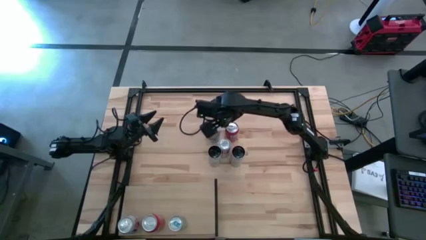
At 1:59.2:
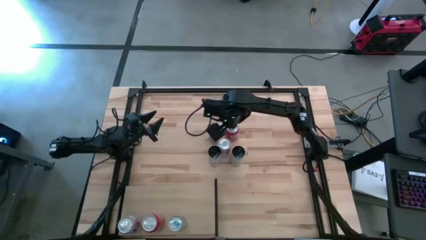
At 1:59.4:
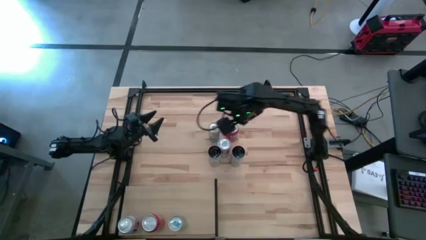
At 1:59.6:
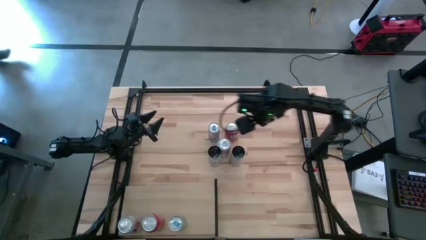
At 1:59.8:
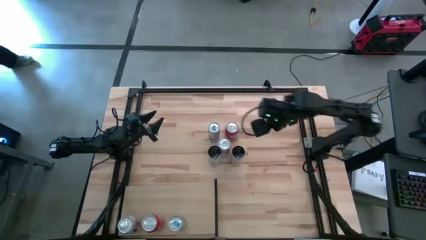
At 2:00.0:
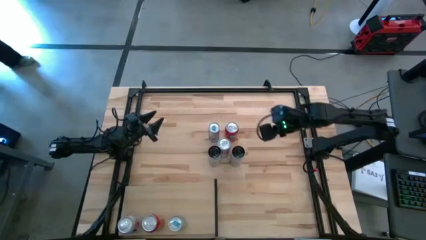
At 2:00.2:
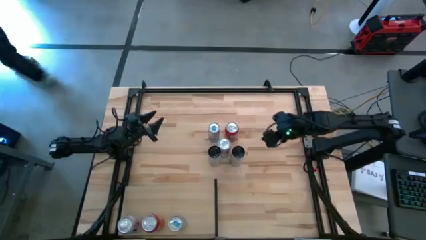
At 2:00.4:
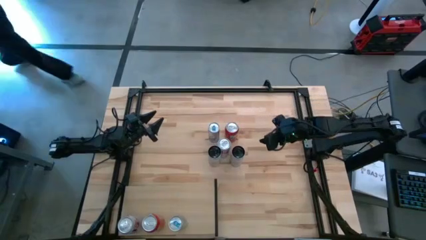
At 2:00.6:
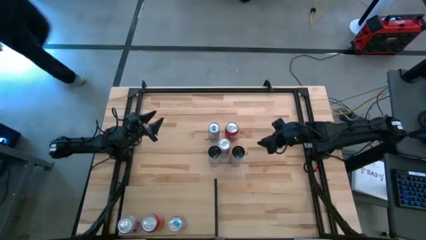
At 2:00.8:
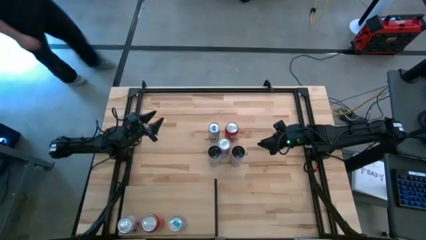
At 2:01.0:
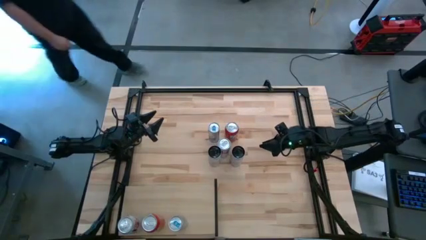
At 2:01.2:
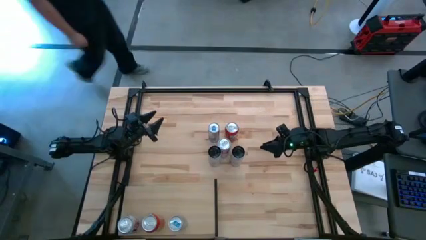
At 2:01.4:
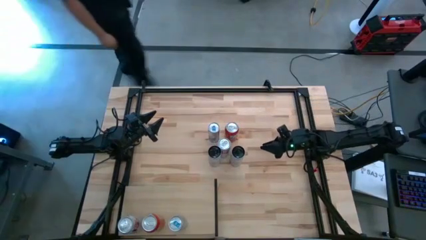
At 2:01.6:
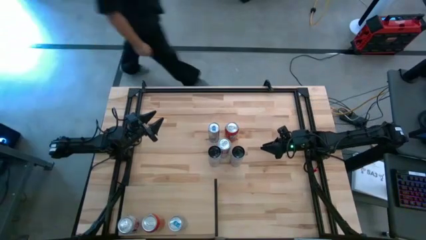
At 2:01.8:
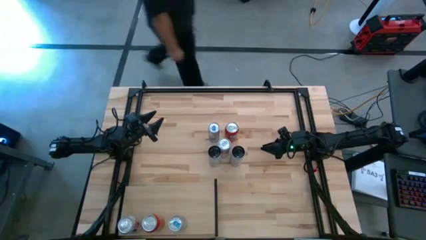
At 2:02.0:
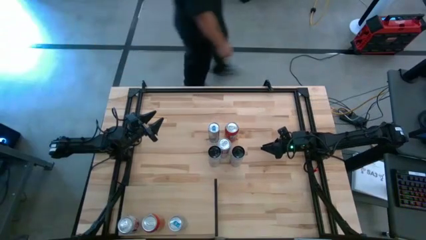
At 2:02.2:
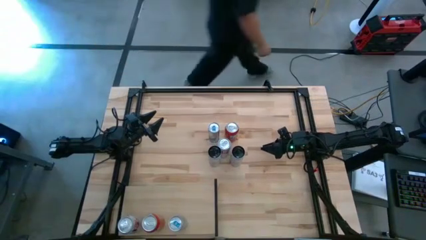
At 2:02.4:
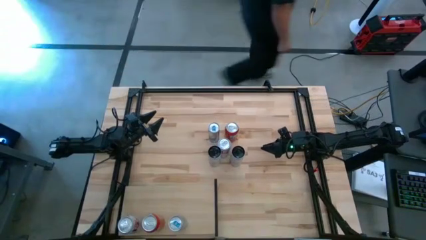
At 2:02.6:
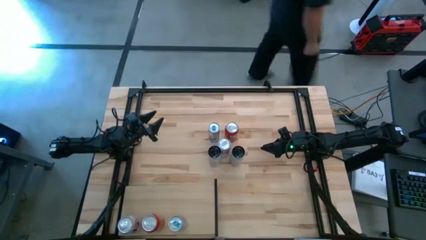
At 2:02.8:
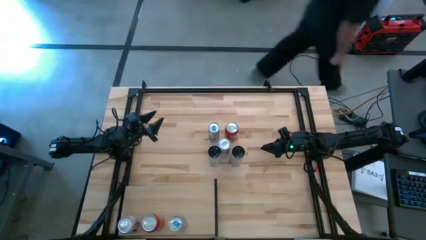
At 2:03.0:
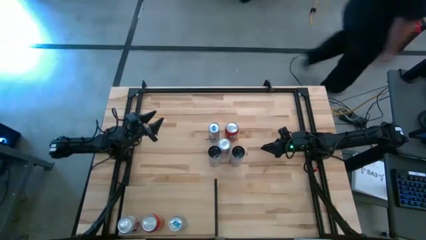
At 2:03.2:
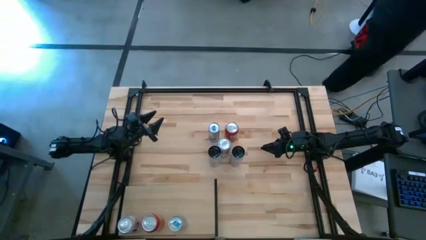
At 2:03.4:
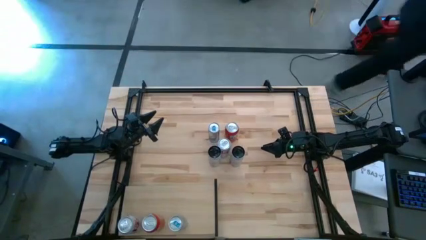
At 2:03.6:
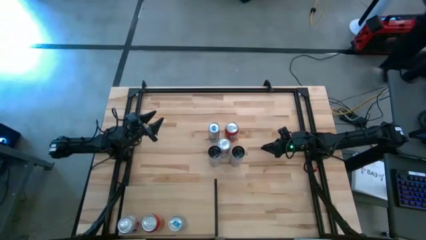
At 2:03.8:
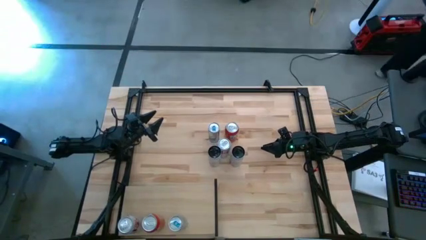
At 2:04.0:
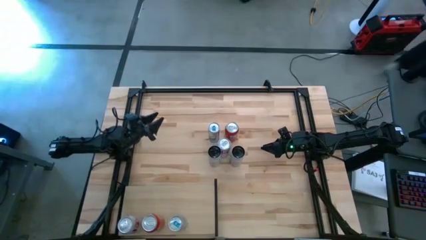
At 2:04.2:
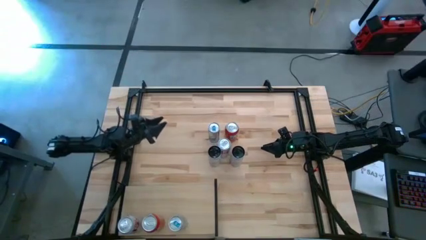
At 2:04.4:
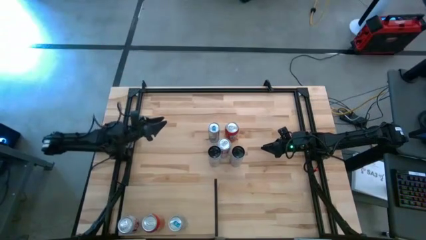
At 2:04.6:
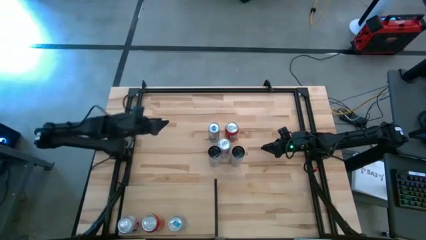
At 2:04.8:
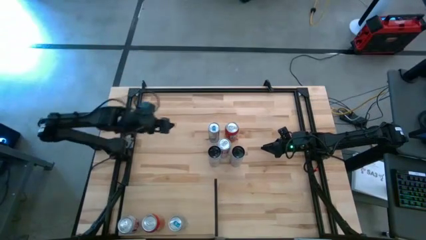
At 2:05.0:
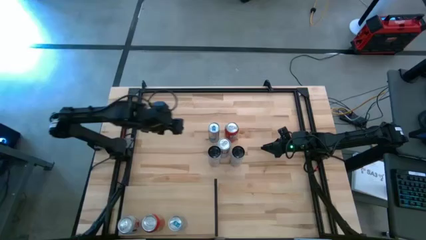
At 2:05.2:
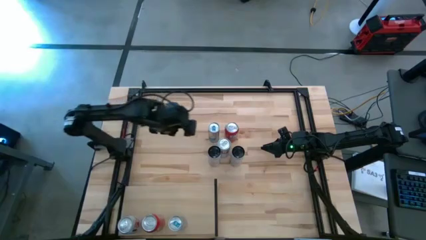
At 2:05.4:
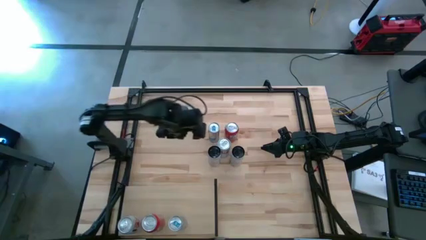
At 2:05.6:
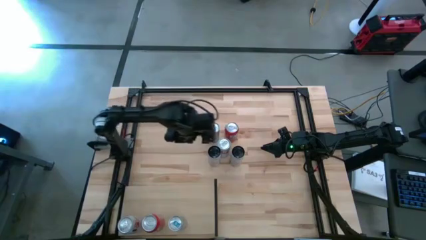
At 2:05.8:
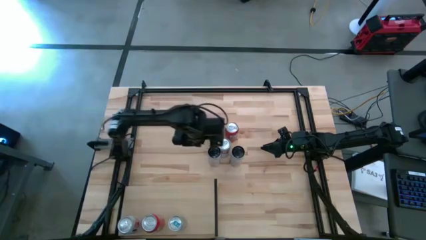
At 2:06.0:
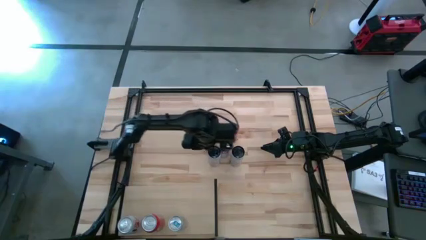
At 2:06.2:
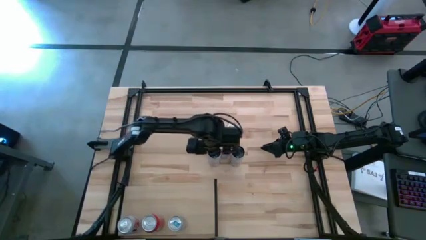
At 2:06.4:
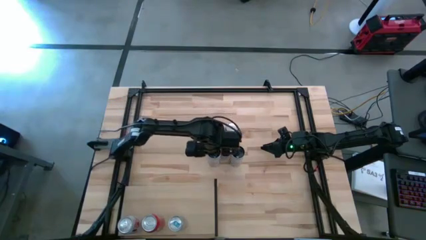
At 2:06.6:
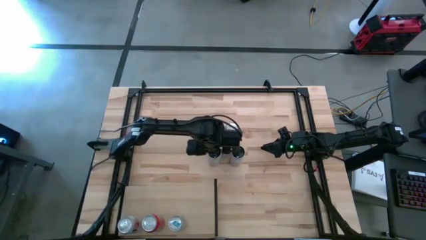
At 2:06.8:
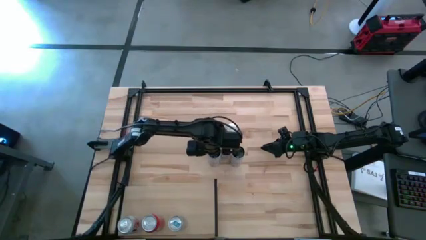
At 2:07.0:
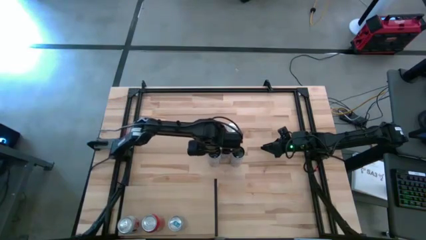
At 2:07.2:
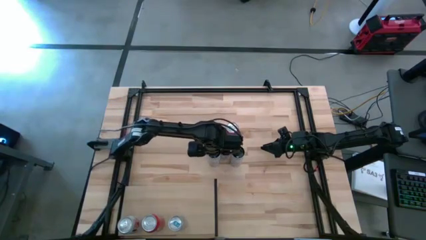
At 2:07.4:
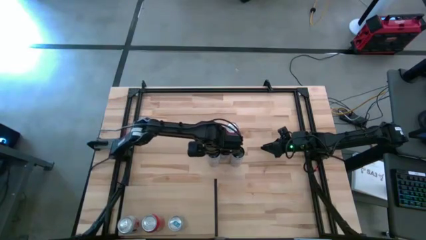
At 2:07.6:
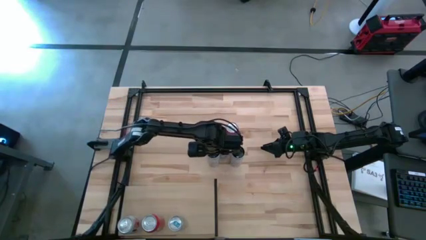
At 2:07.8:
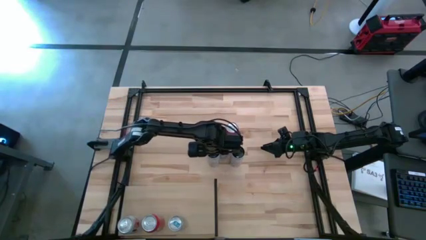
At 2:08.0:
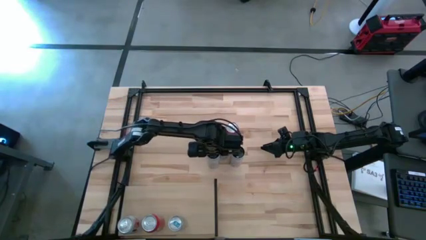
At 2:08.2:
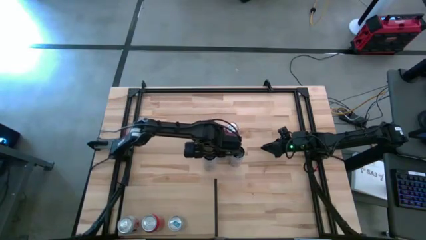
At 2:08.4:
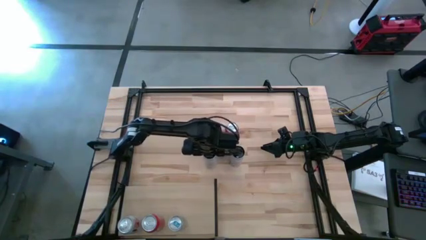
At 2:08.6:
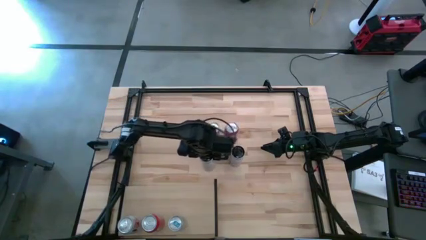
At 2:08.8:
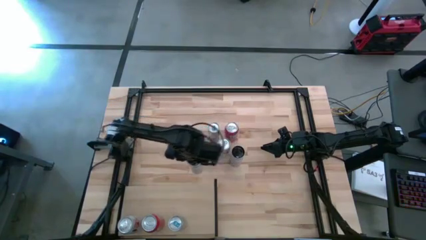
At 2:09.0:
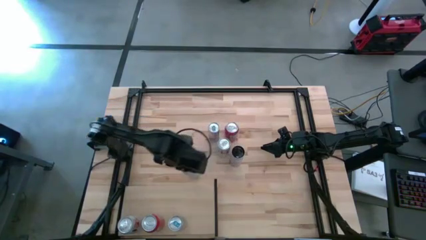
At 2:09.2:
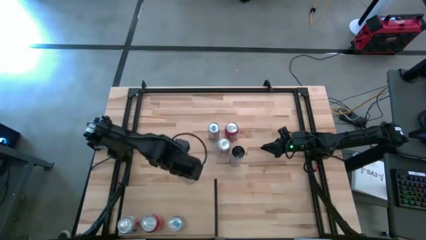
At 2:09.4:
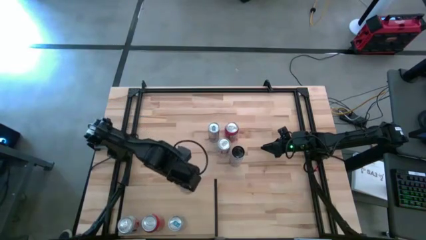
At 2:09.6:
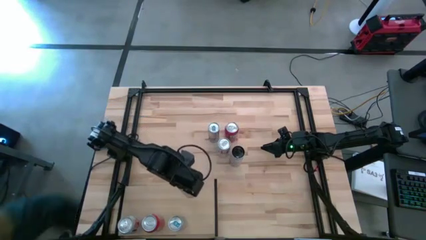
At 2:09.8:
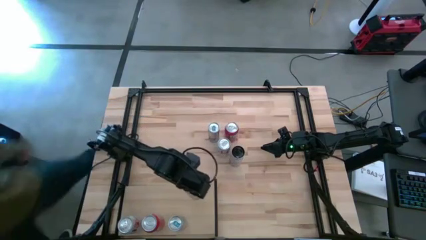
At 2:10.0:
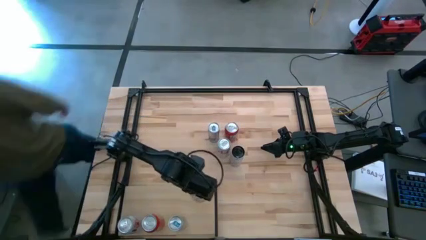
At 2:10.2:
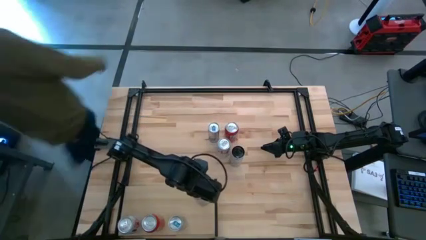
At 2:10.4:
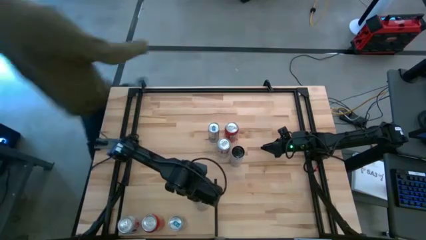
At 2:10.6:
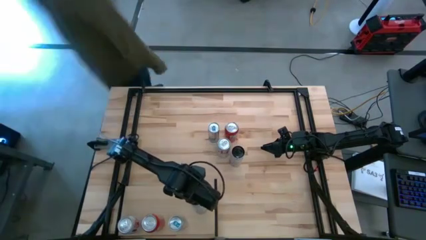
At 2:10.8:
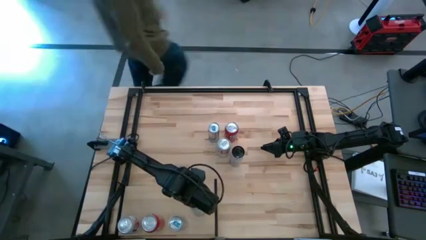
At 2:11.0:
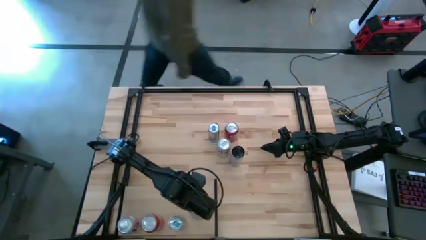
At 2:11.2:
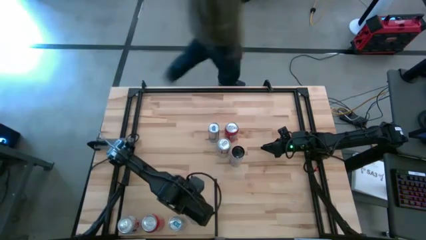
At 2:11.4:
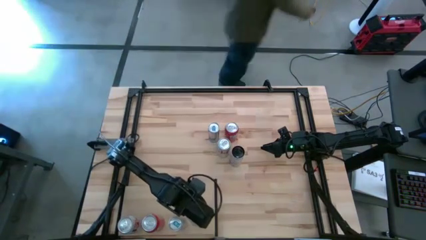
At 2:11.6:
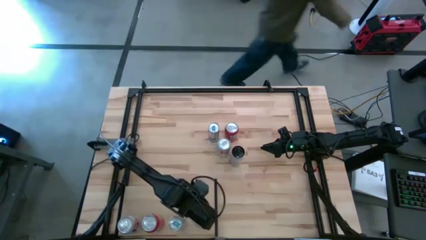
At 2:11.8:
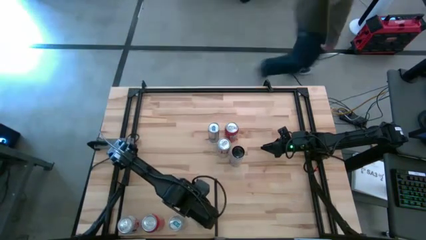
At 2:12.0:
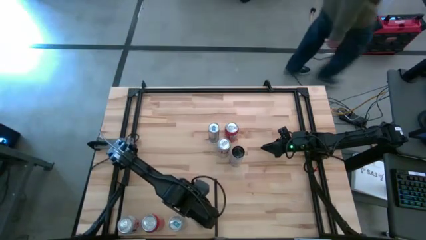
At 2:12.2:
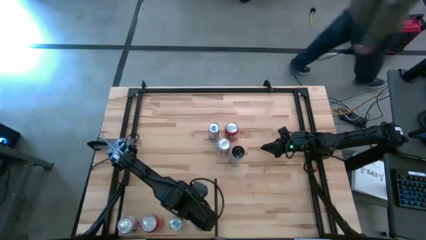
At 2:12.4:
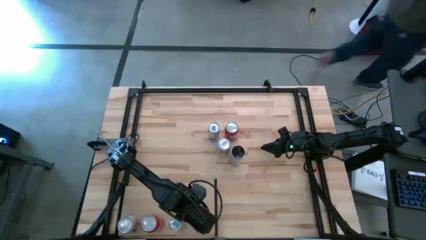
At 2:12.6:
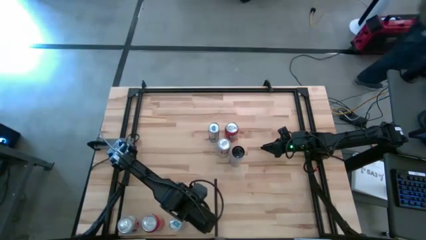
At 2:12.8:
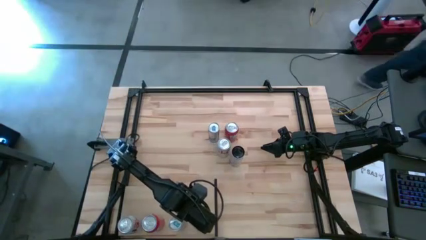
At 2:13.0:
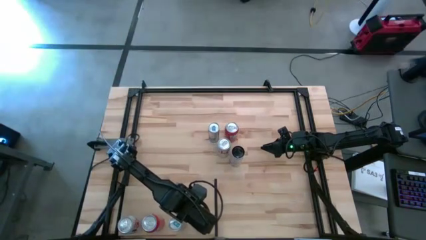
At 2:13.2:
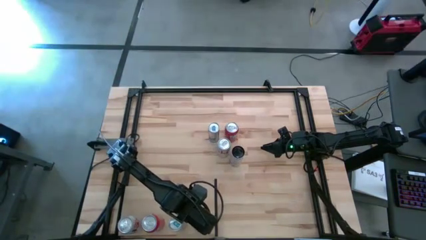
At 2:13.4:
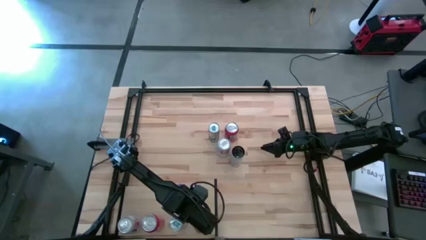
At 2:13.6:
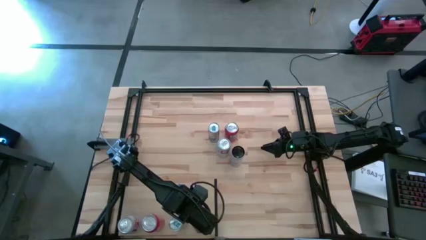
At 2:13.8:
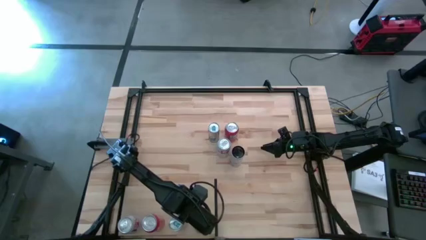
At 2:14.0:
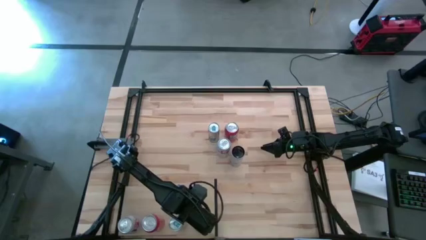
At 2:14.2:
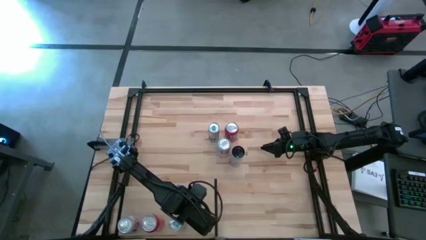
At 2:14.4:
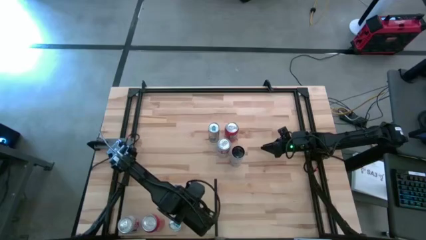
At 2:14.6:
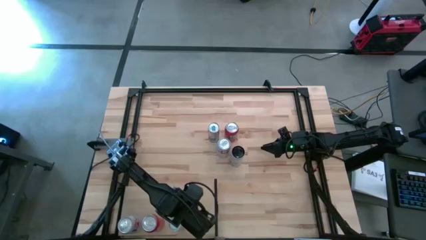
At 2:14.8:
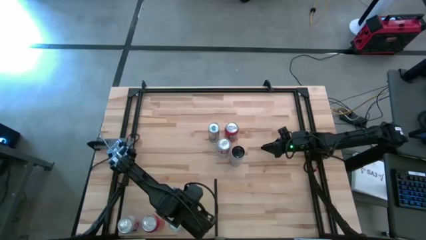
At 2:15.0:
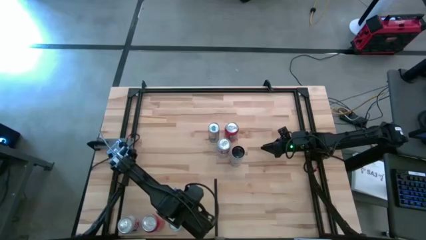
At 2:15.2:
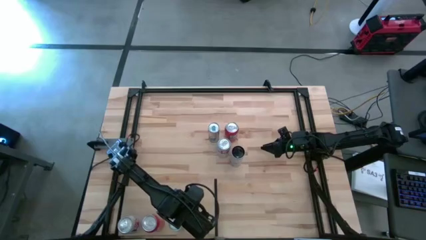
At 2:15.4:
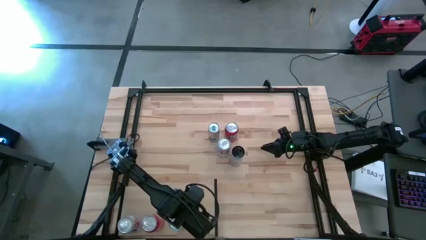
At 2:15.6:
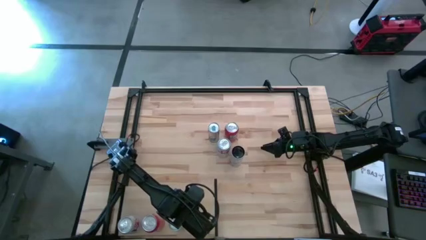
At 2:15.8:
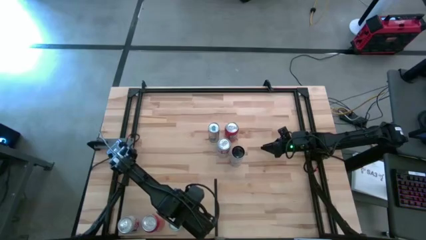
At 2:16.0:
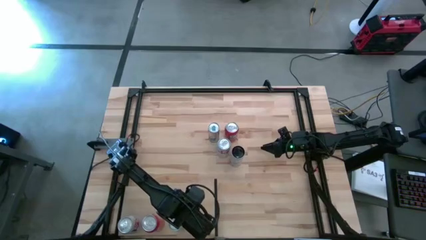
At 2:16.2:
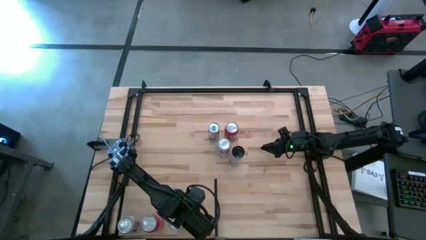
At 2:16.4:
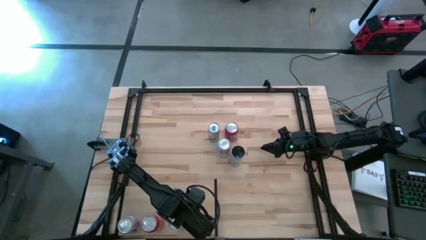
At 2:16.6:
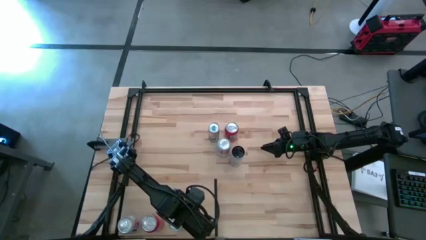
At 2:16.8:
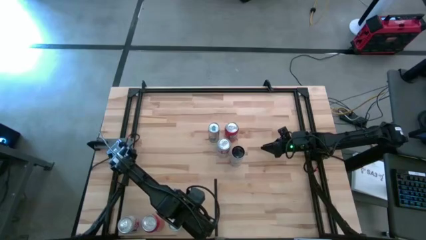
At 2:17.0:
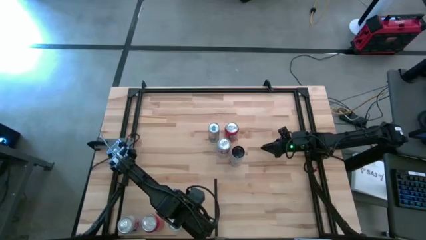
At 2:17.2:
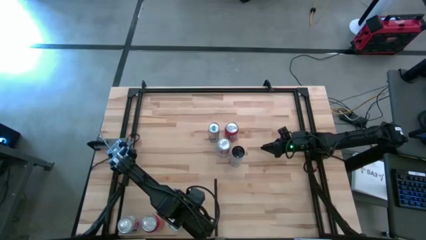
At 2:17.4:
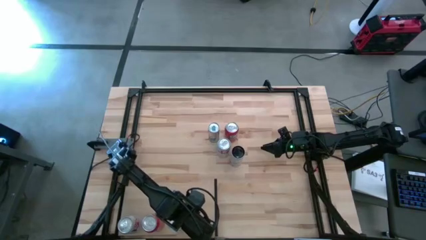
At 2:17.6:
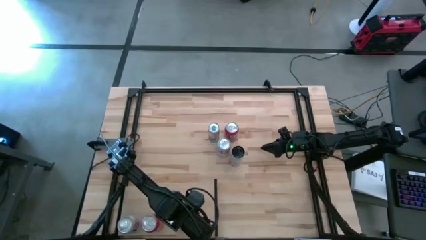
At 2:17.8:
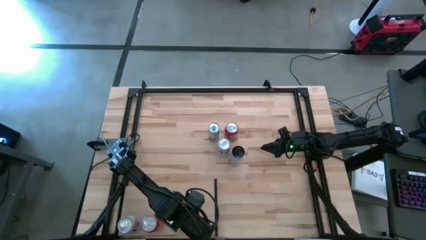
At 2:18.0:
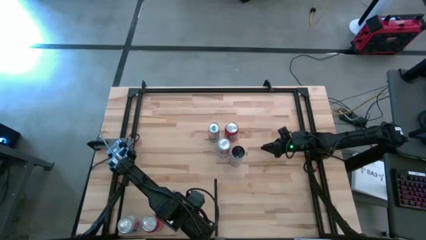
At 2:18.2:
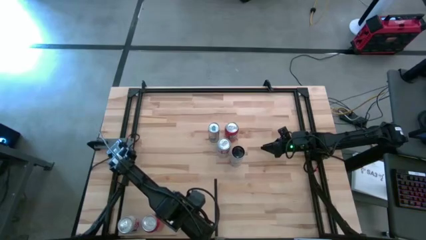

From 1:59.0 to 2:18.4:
Task: Place canned beverage on shelf
Put the left white pink soda can on the shelf
